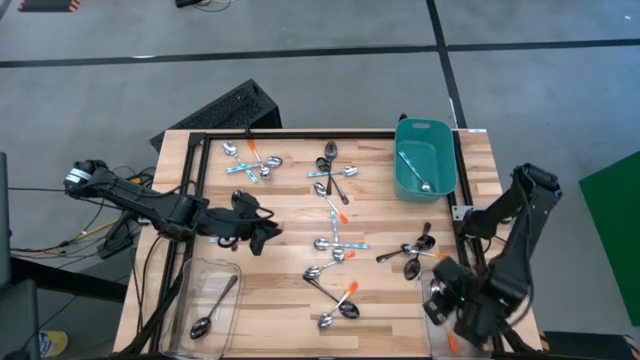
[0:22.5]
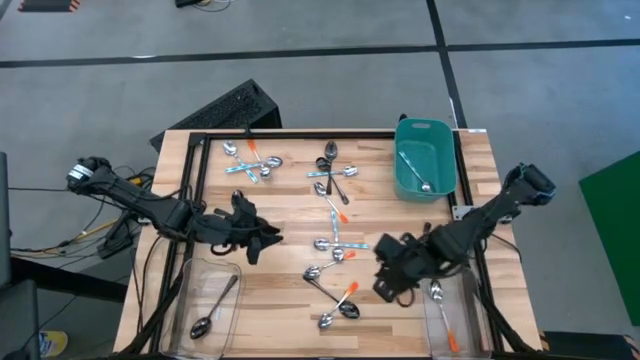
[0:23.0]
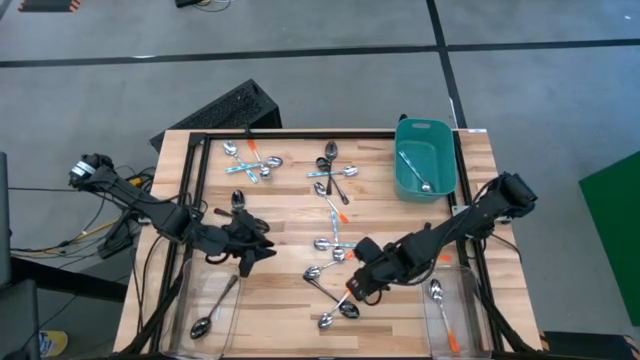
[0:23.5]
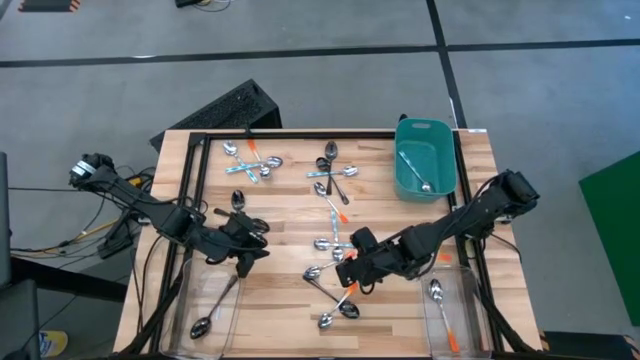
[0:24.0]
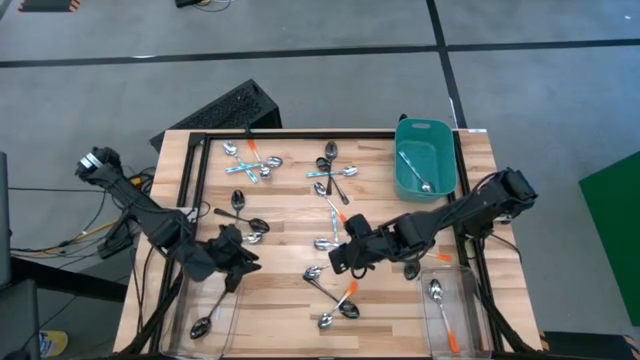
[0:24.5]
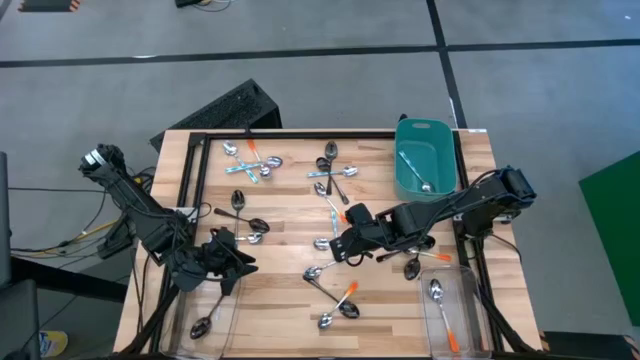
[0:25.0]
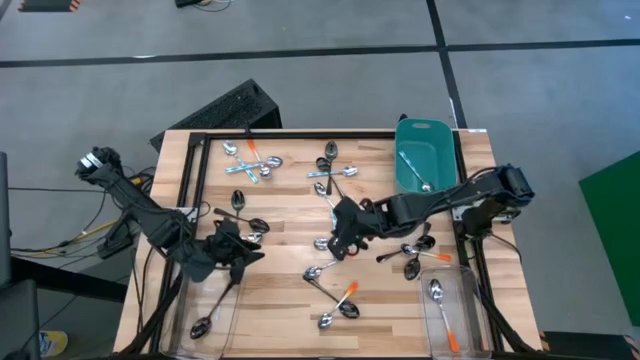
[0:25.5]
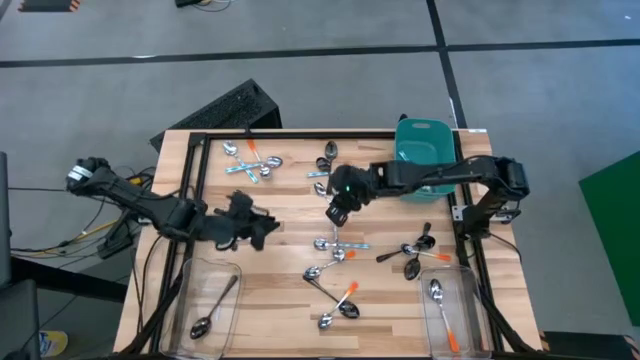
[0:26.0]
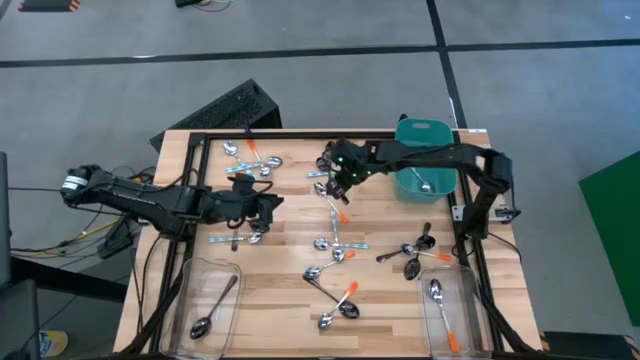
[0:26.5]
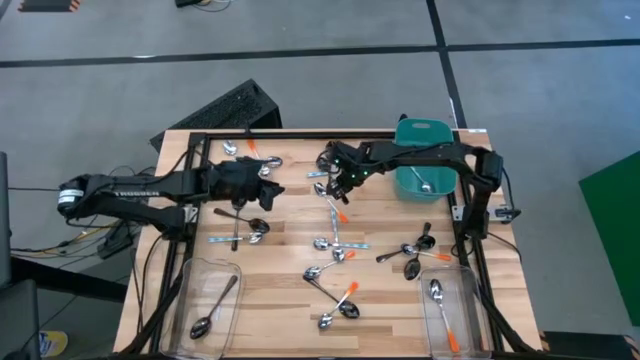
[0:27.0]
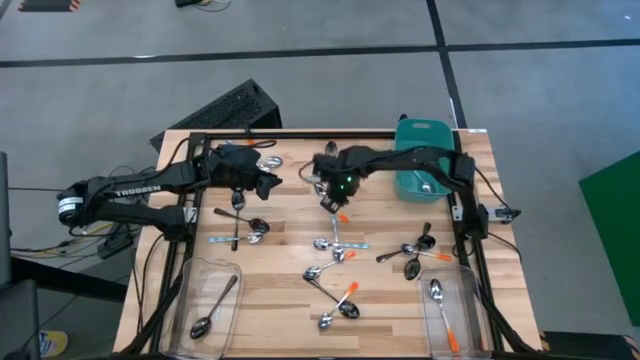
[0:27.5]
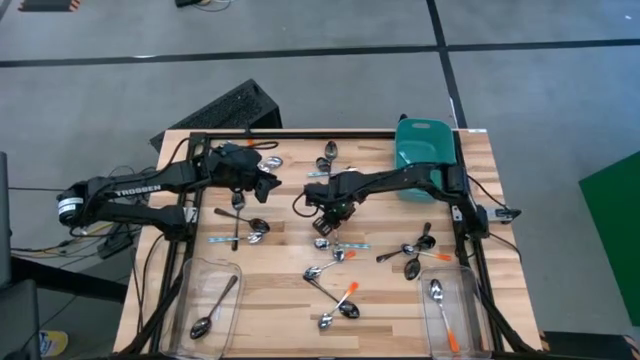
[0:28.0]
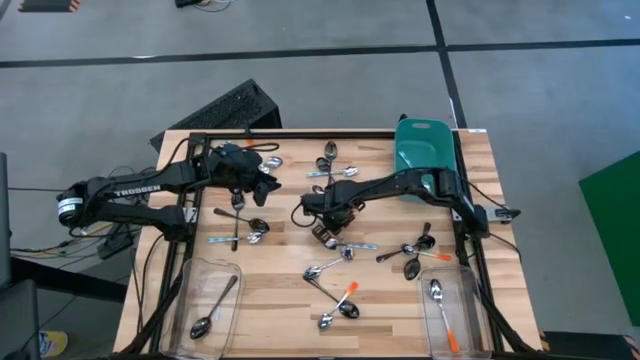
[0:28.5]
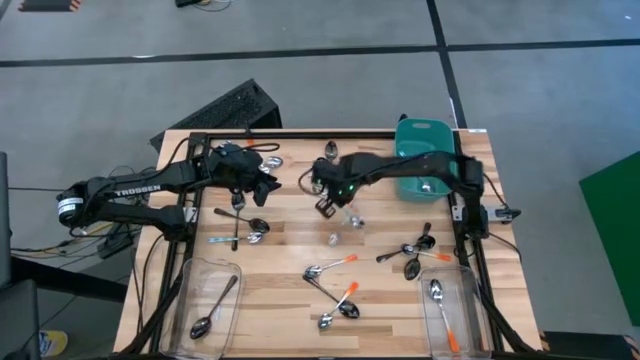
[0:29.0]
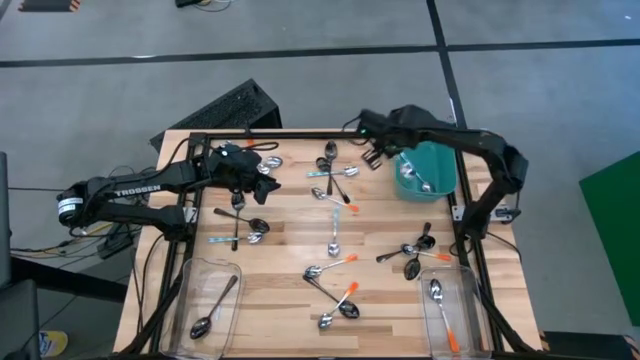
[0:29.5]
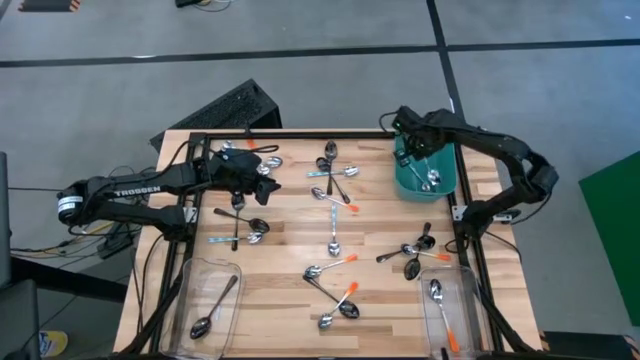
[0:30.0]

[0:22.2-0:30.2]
Task: Sort silverware by color (type)
Put the blue spoon in the blue bin

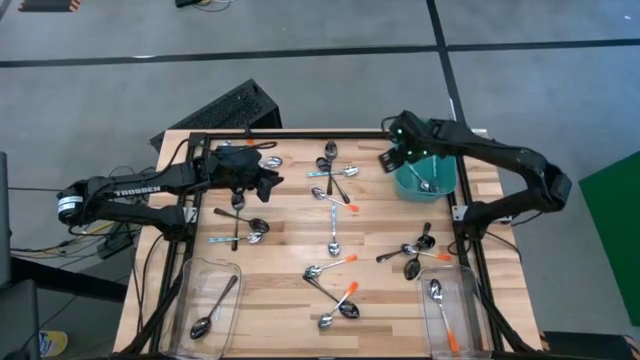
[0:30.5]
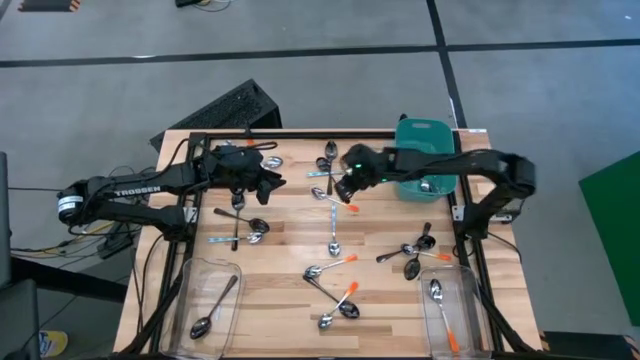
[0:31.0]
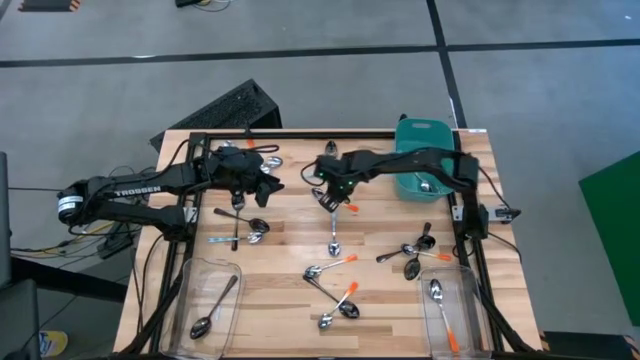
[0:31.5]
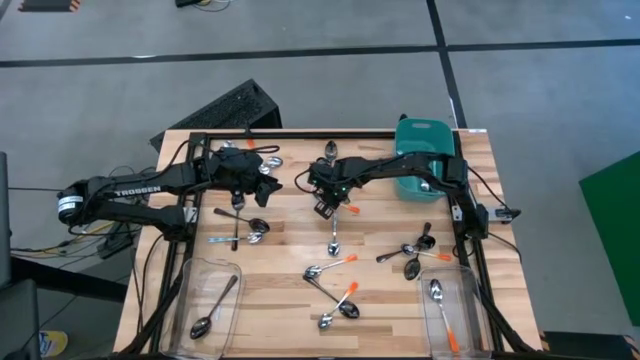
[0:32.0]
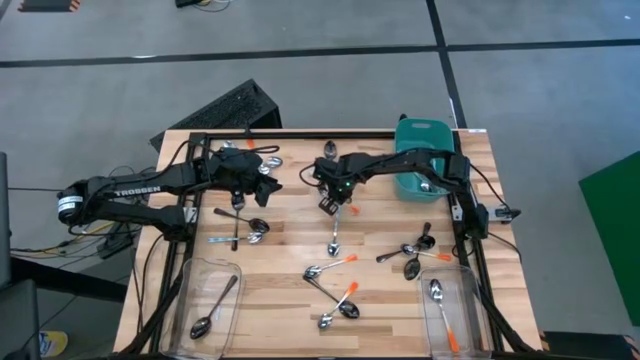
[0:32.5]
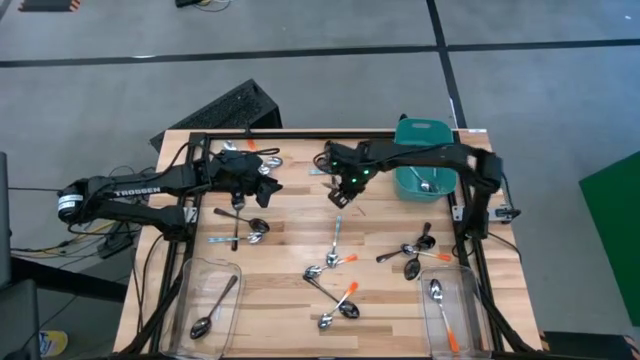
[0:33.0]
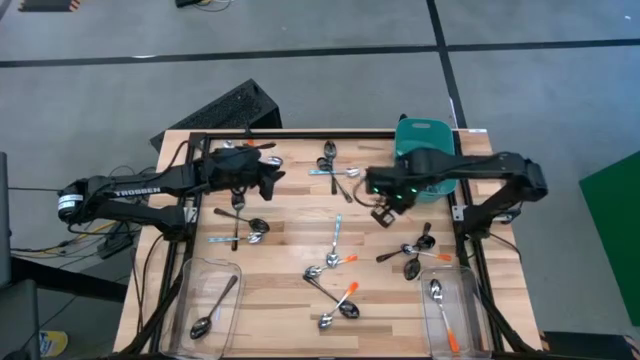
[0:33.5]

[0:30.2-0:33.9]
Put the orange spoon into the right transparent bin

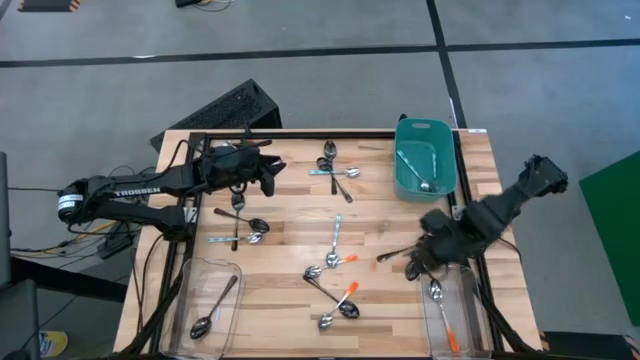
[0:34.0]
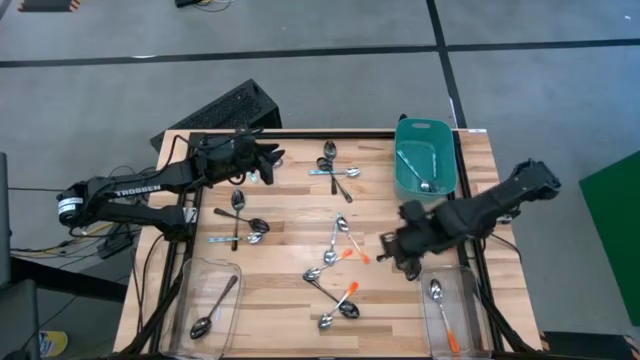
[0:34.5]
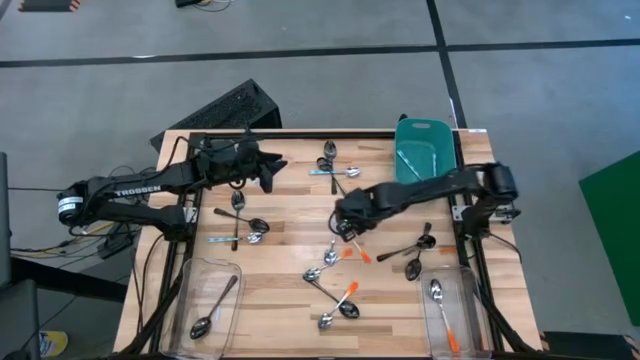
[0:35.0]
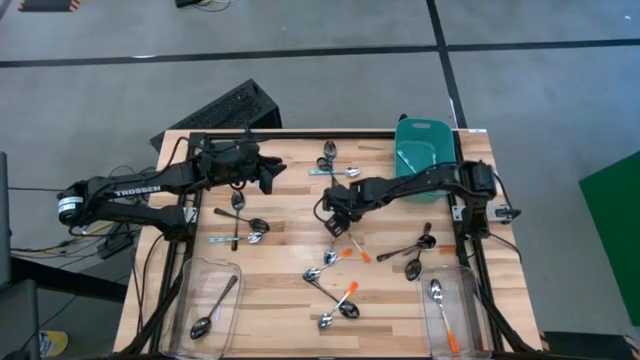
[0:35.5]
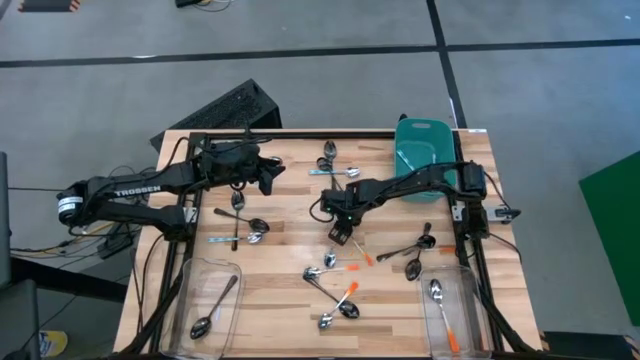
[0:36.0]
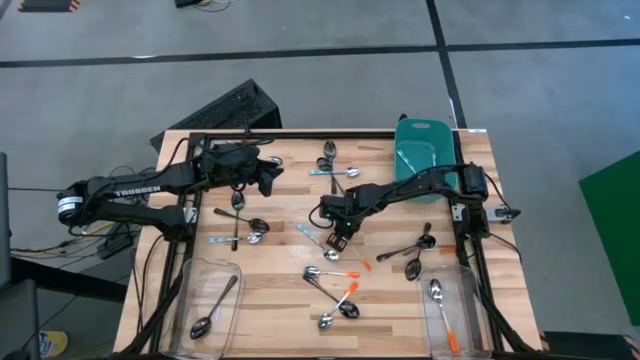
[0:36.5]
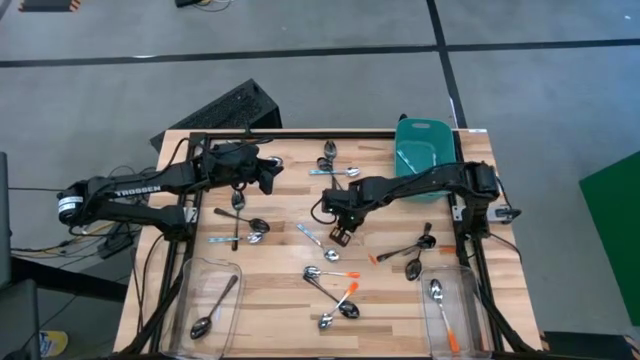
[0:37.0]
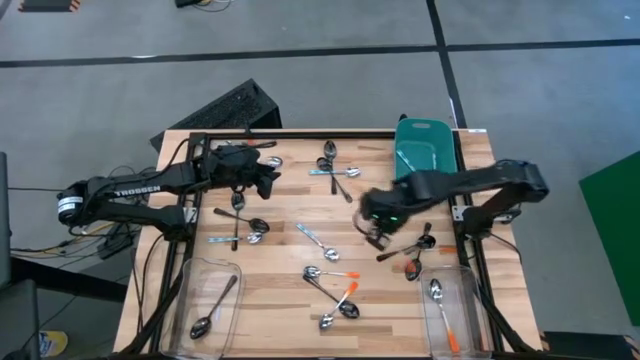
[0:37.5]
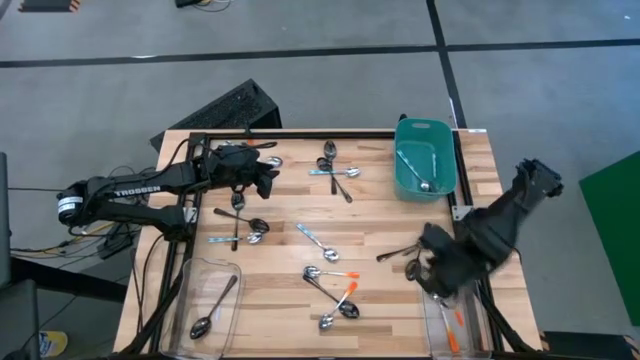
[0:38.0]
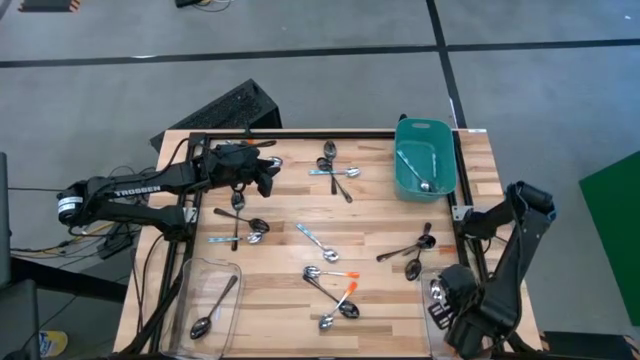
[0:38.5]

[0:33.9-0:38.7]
Put the orange spoon into the right transparent bin

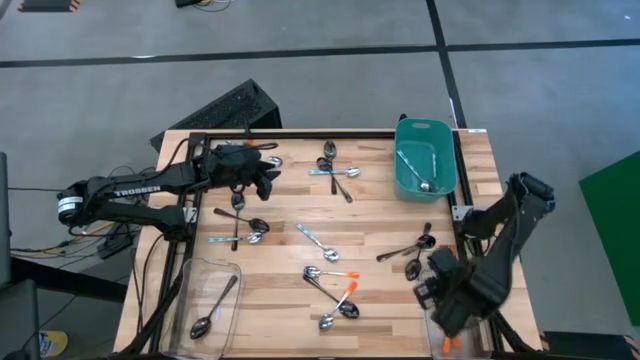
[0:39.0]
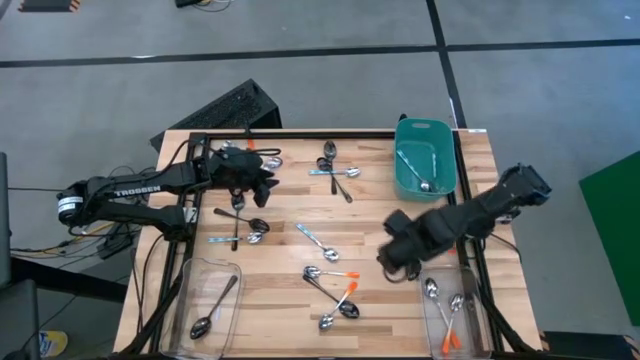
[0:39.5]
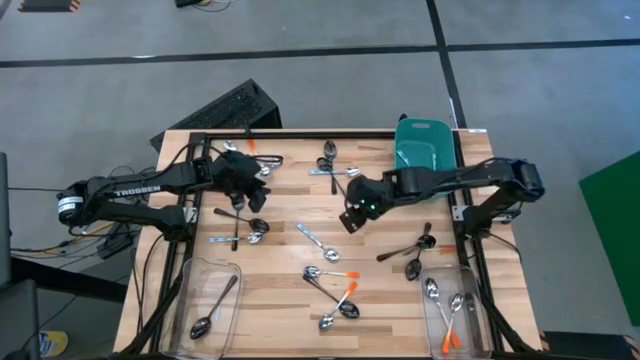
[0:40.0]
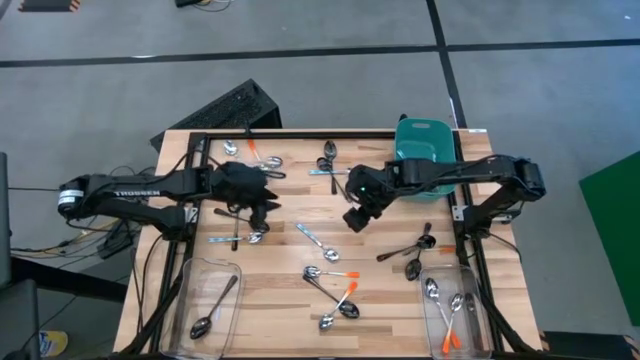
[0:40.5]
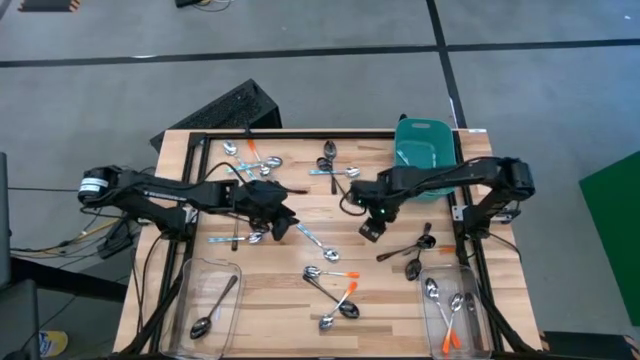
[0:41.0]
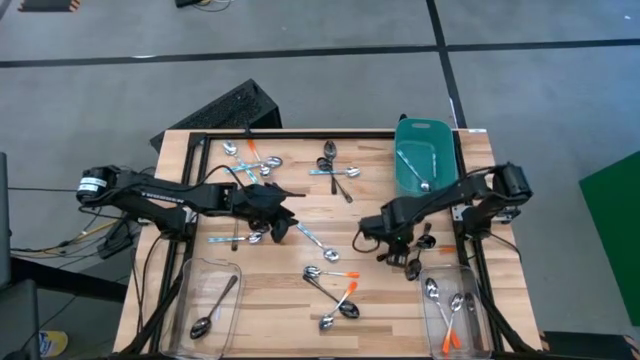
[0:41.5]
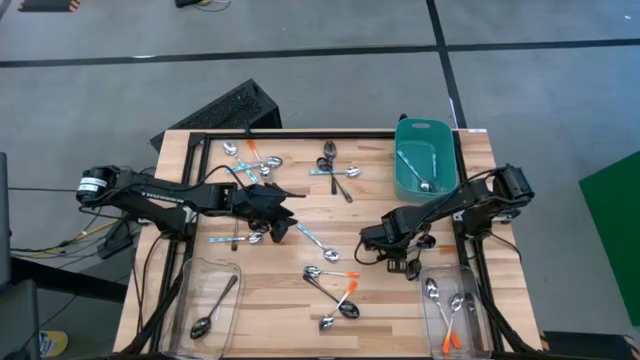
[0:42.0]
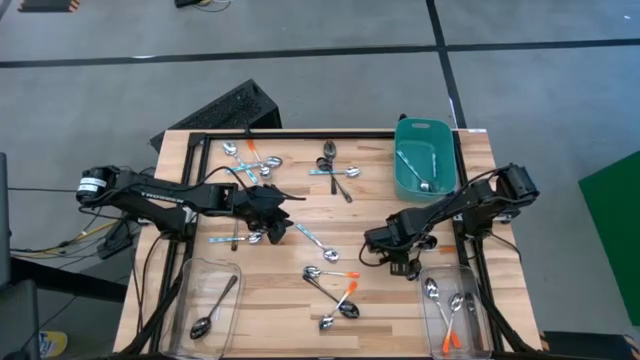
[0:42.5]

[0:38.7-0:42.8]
Put the black spoon into the left transparent bin
